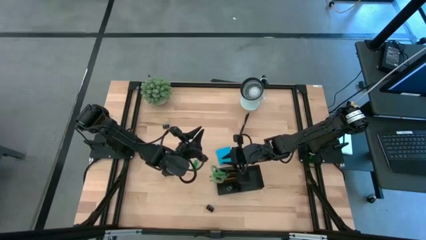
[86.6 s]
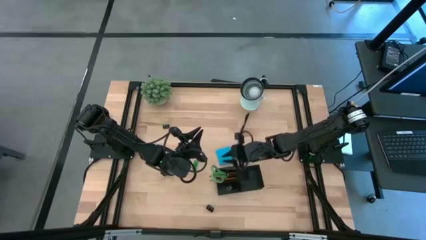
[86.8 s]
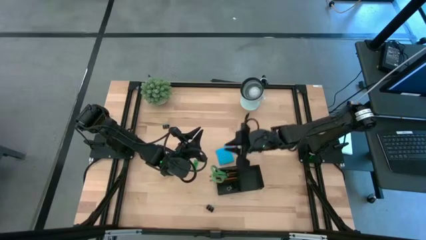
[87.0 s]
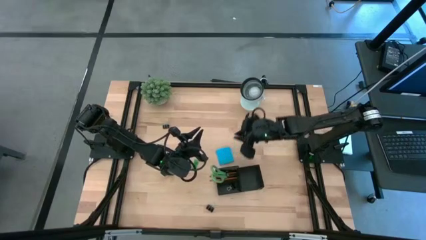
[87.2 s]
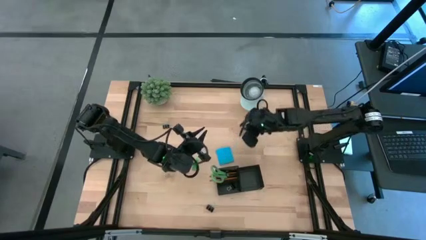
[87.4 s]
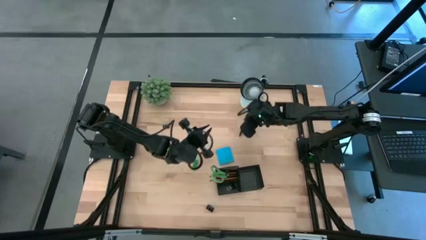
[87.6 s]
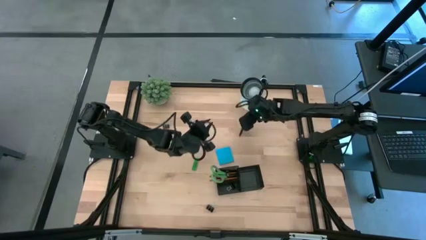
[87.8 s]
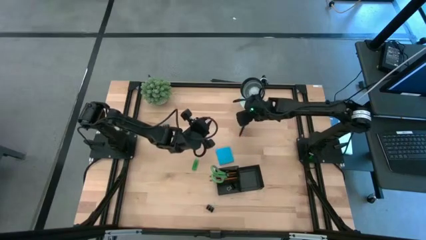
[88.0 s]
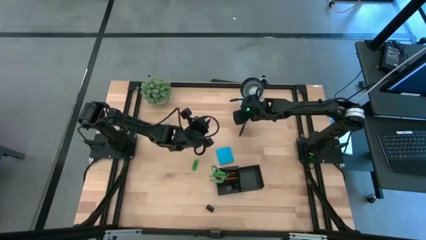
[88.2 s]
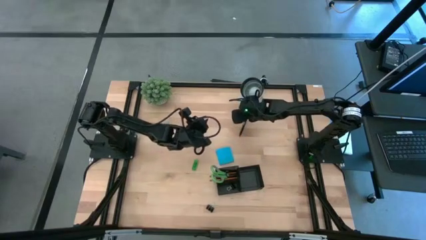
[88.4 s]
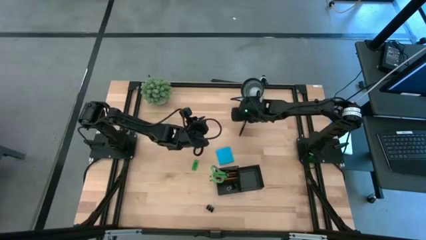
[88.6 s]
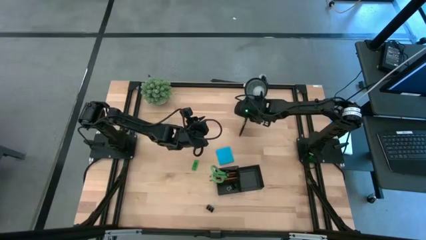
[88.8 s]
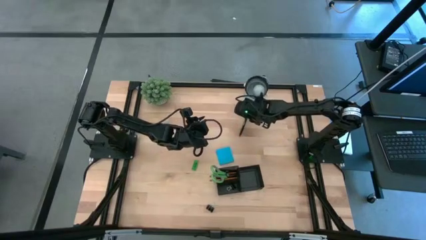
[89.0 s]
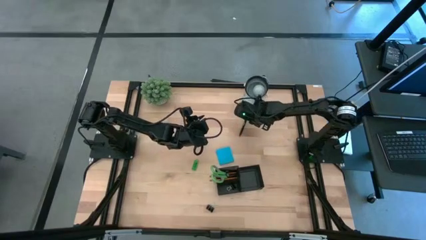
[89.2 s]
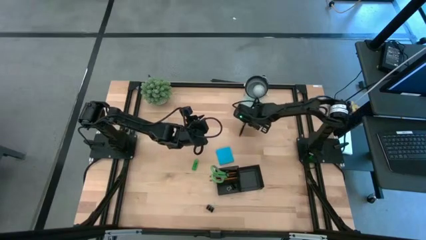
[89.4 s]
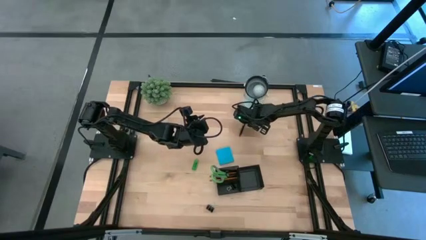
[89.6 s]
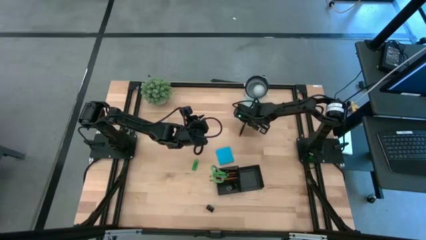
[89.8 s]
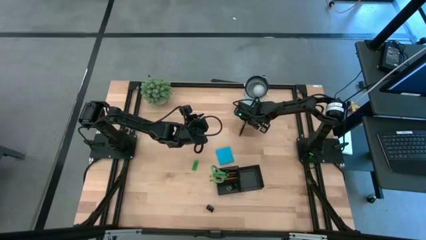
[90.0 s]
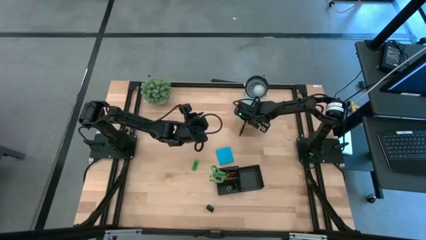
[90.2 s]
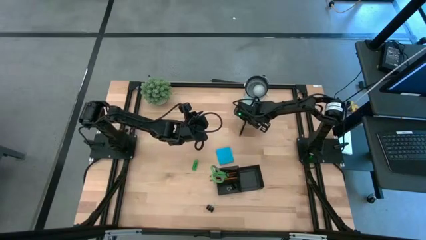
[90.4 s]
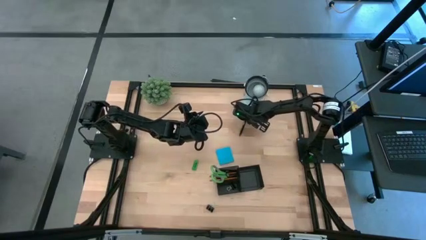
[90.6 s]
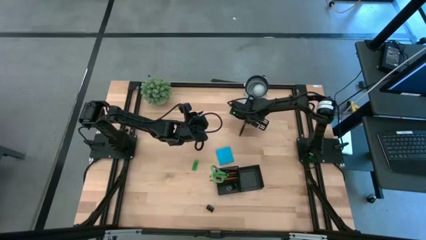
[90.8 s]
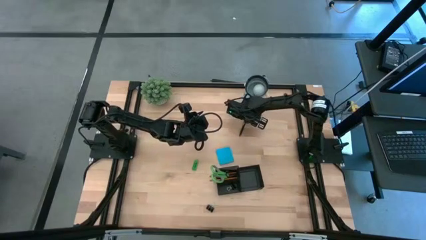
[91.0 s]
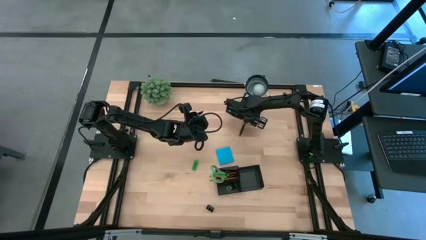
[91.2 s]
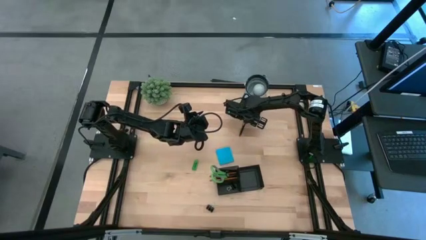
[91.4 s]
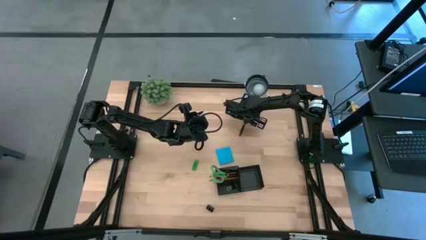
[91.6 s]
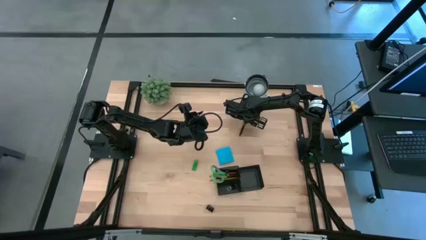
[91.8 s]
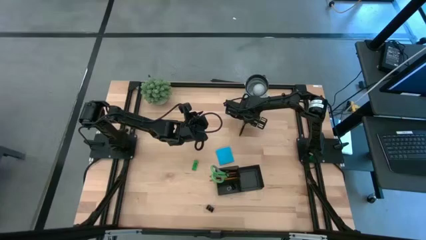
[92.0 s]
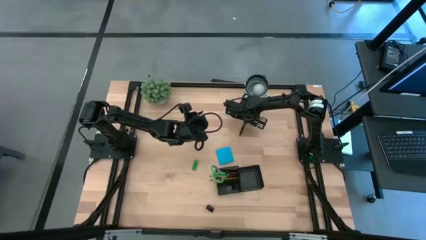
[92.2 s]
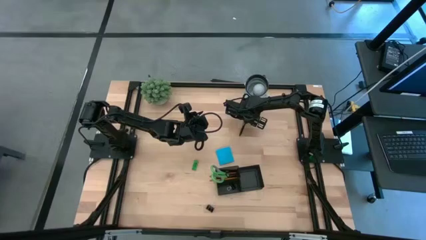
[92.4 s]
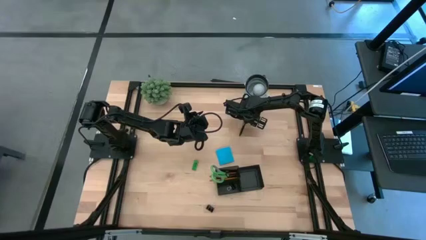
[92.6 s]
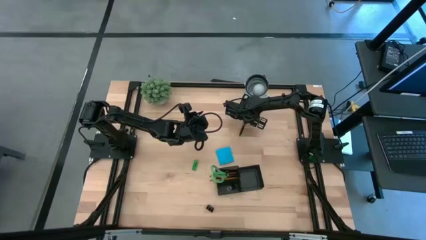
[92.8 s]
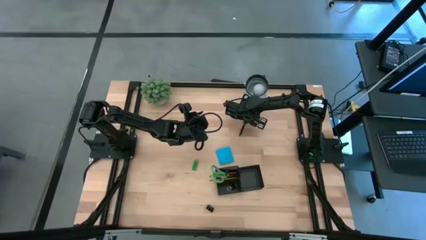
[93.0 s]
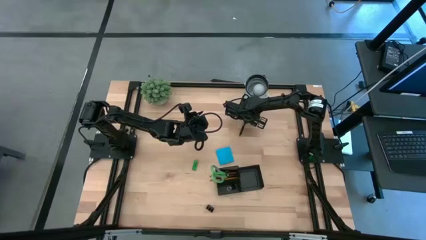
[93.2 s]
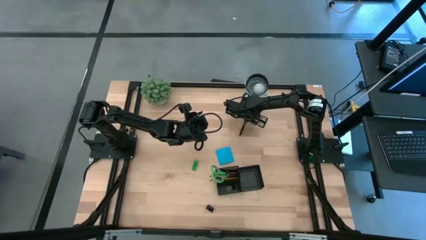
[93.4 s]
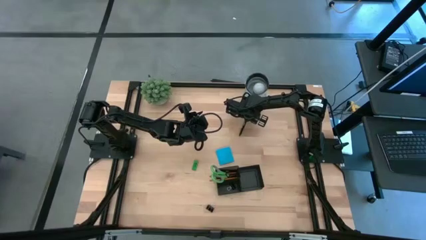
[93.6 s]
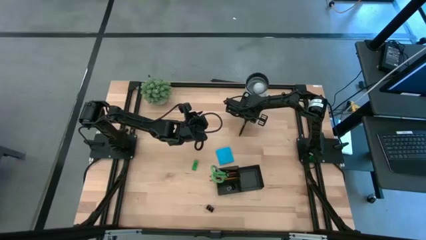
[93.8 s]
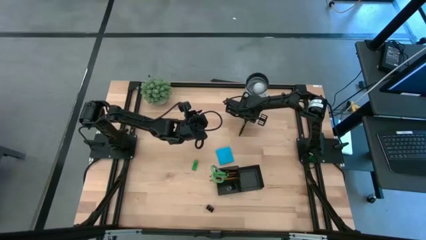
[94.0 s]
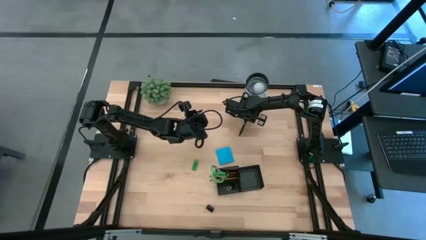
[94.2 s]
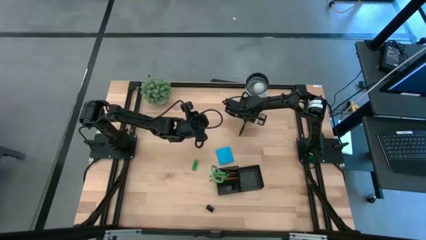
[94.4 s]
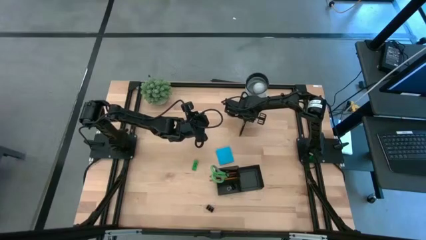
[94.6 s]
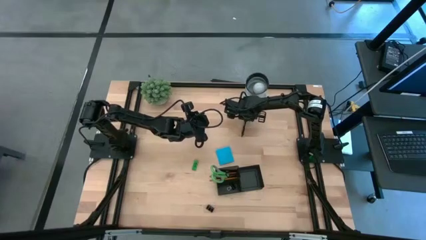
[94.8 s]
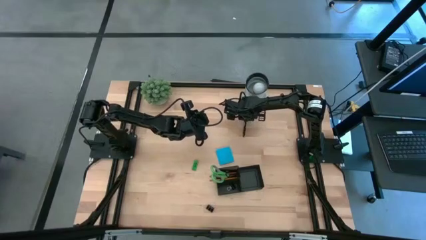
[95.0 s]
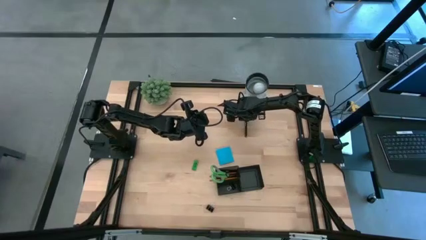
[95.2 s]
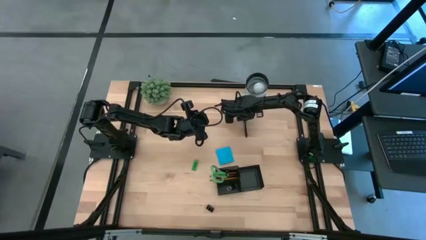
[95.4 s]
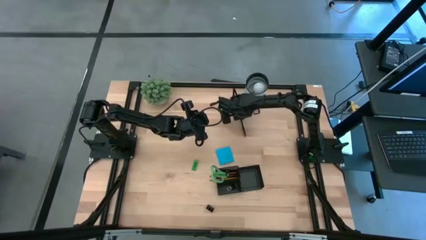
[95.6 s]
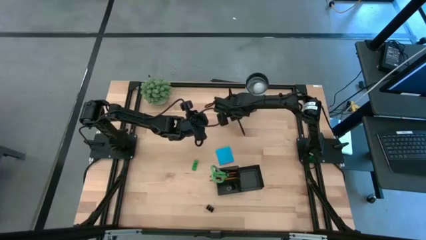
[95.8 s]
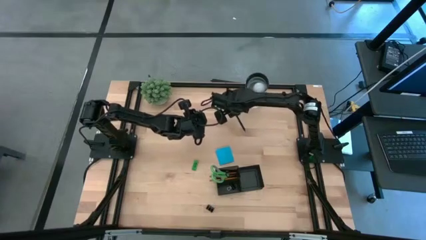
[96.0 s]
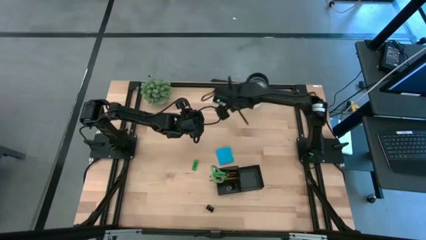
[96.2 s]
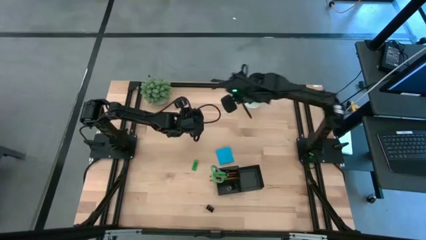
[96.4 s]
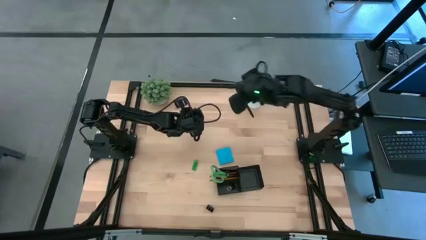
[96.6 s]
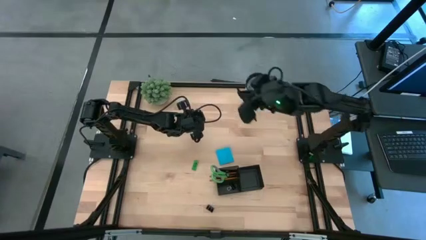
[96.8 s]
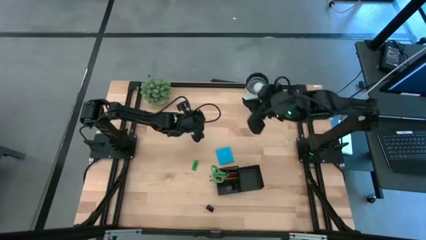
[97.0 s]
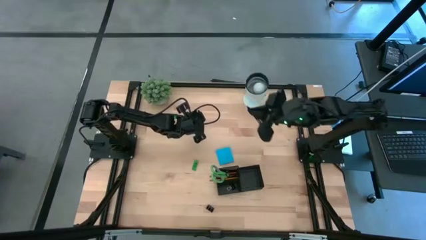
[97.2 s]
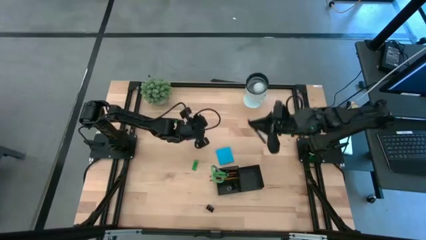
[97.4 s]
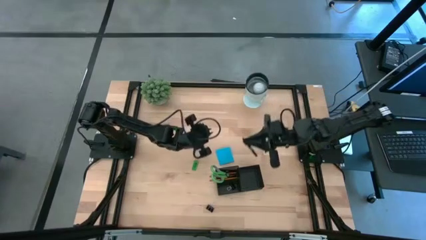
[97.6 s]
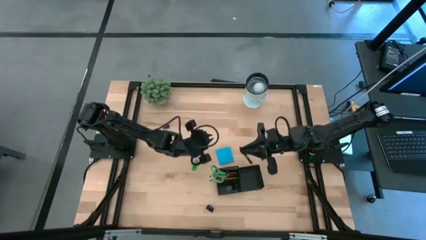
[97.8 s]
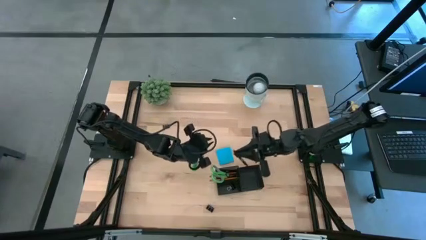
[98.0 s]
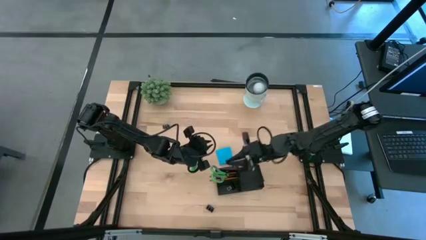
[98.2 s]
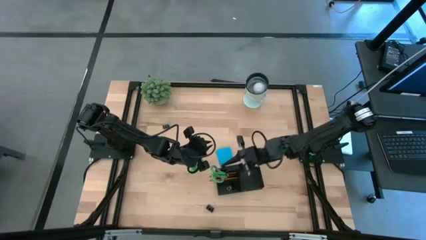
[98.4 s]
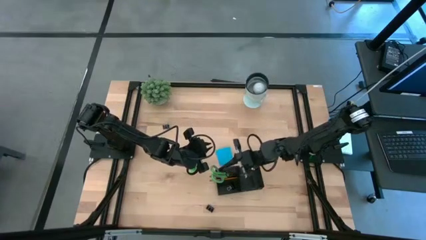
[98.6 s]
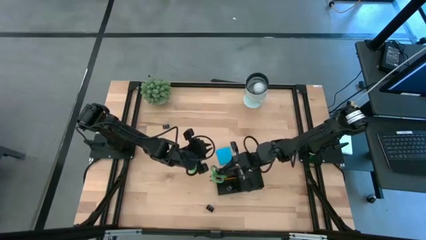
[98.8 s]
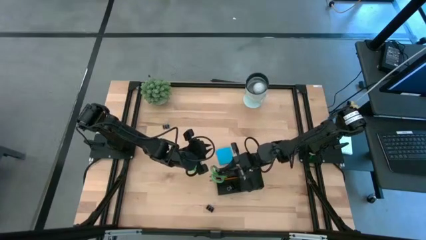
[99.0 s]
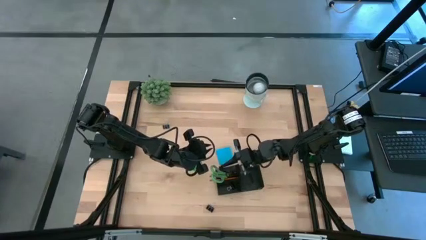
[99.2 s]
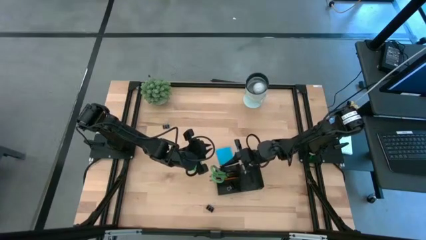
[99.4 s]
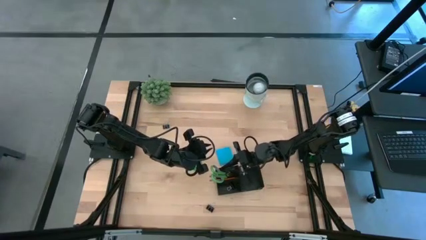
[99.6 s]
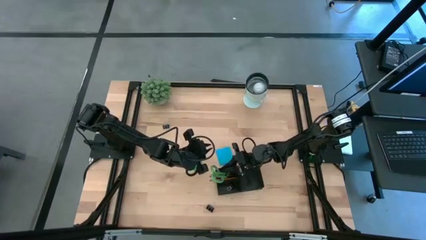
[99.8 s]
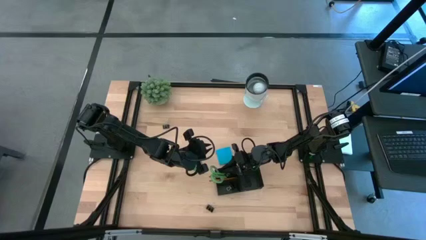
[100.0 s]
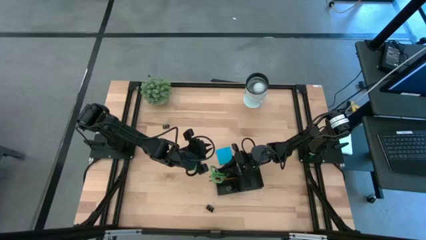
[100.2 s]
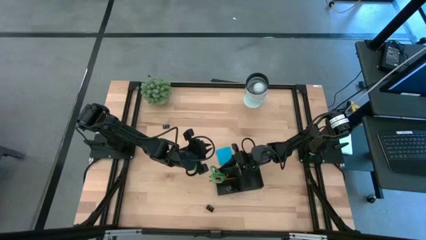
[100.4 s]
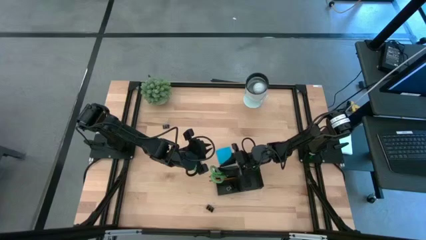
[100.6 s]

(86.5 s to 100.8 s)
Task: Pick and place office supplies into organizer
Put the pen into the top left slot of the desk organizer

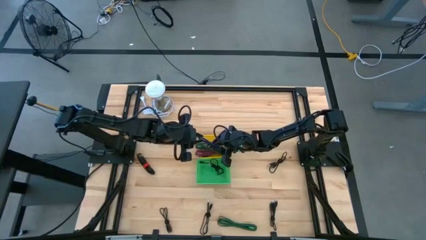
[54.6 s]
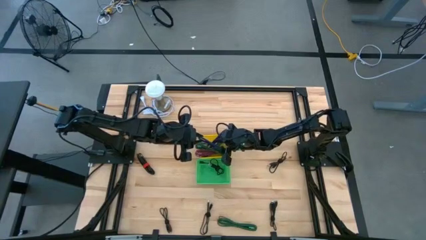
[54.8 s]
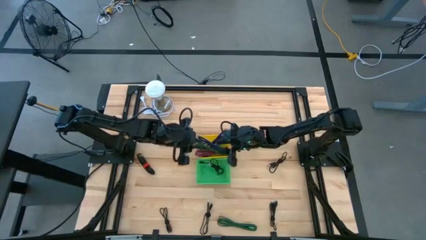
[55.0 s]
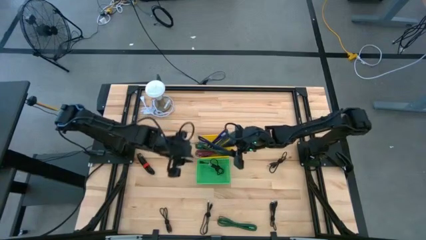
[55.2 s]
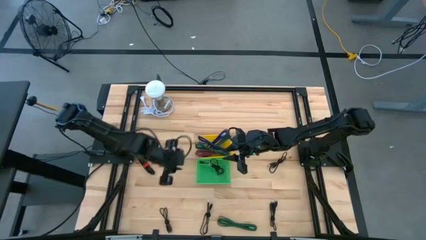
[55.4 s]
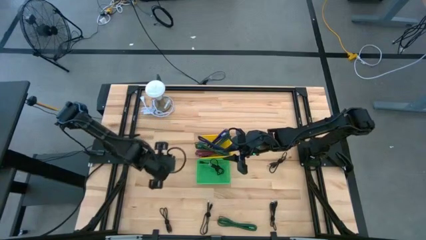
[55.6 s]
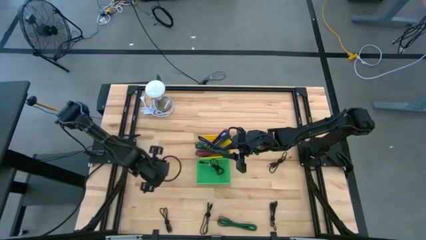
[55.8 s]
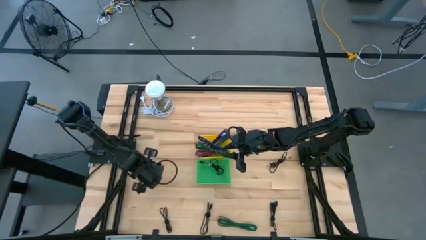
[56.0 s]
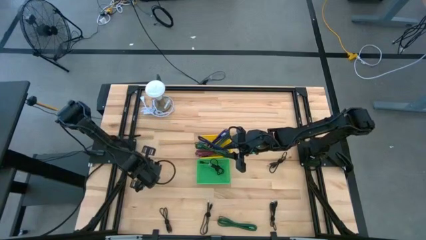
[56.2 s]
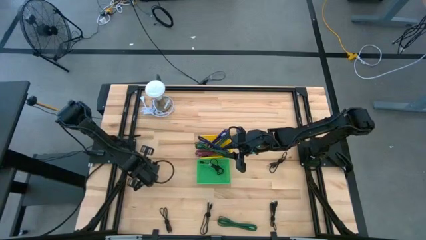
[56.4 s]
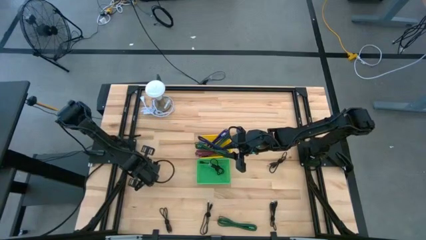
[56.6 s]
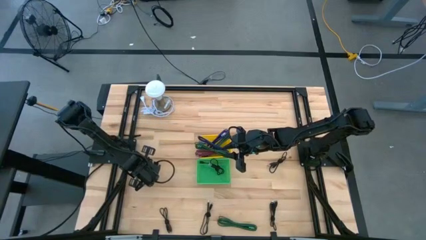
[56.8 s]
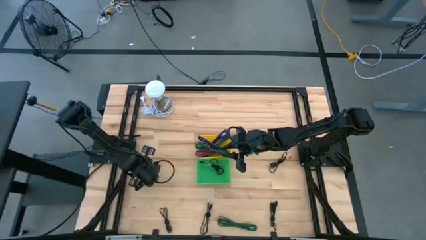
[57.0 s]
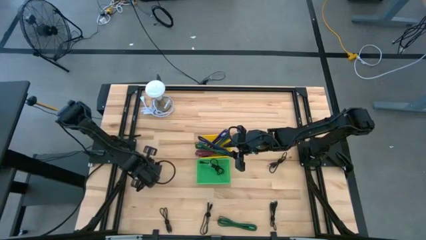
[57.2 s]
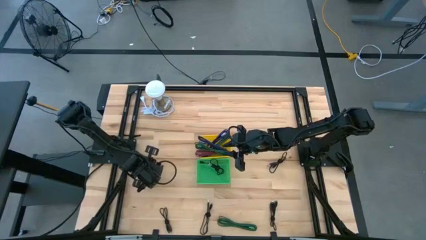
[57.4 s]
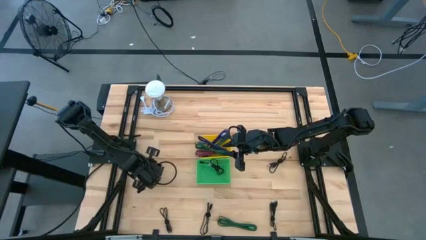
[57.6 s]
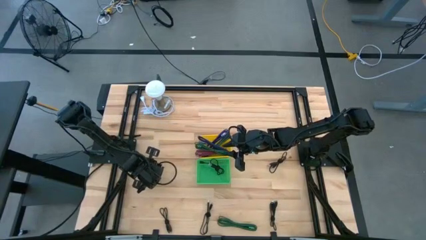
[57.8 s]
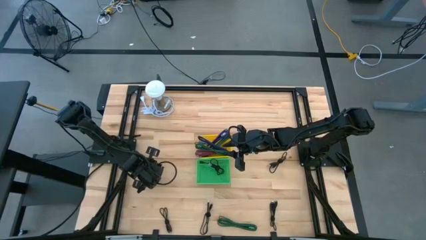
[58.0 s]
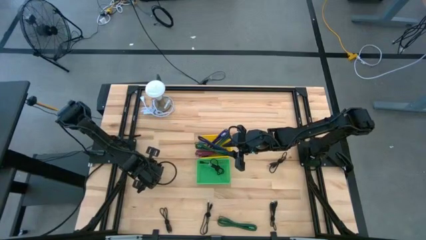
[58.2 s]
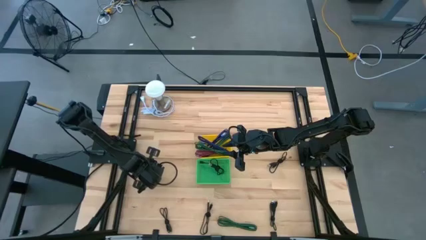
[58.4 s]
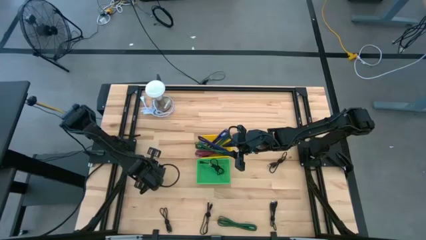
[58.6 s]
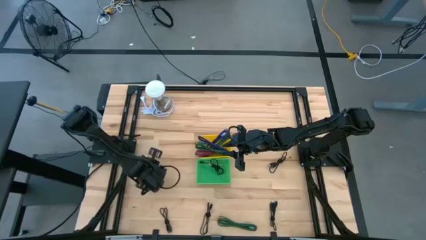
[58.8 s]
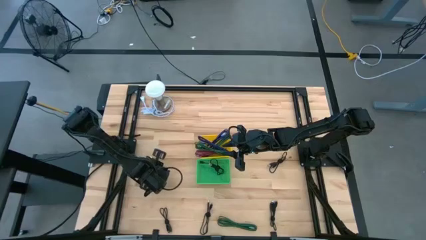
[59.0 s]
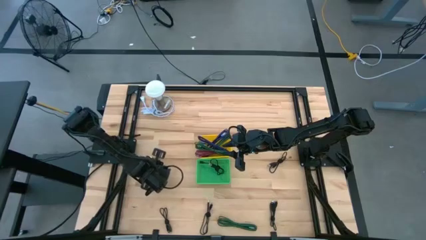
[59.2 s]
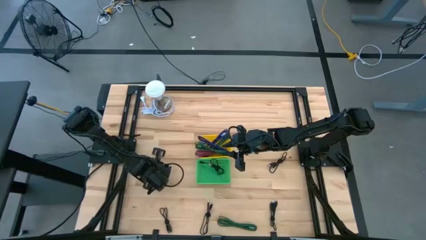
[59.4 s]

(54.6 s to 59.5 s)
Task: Pick & Place USB Port
Put the black USB cable into the green bin
